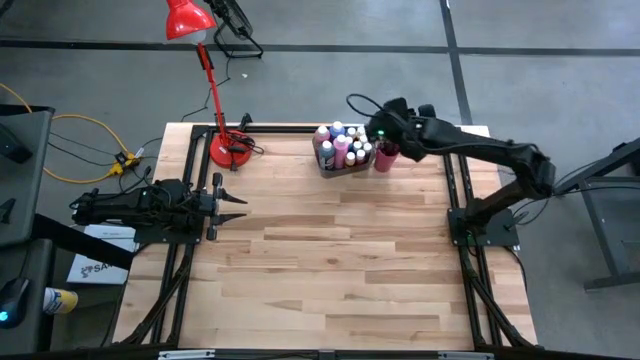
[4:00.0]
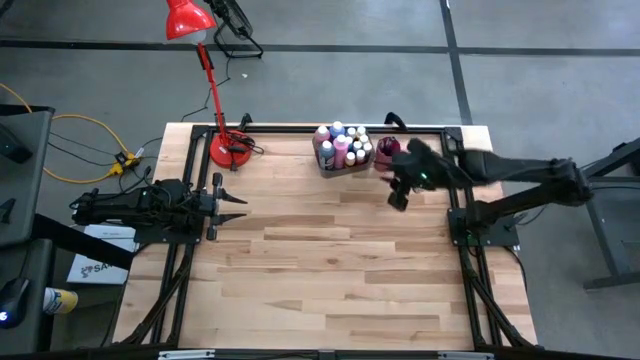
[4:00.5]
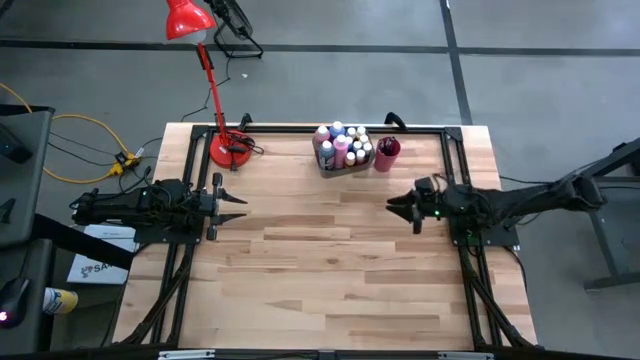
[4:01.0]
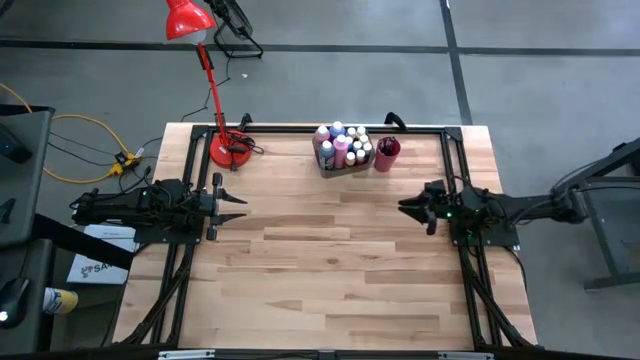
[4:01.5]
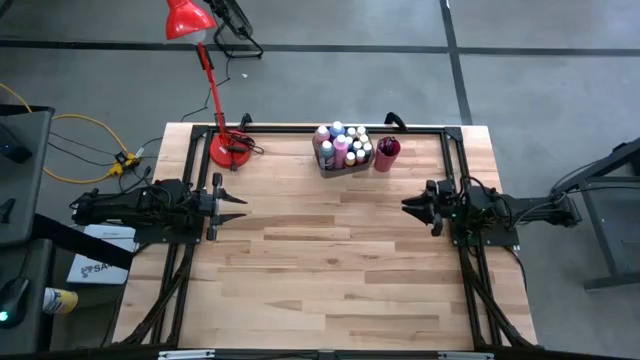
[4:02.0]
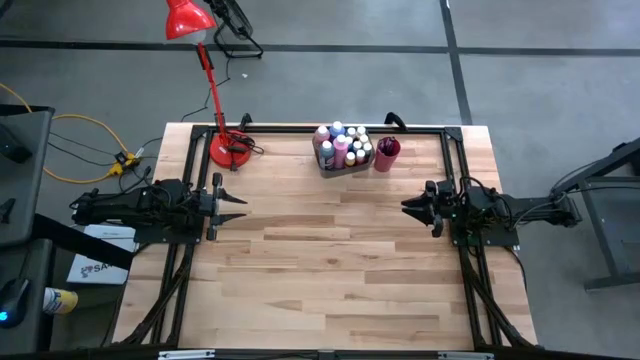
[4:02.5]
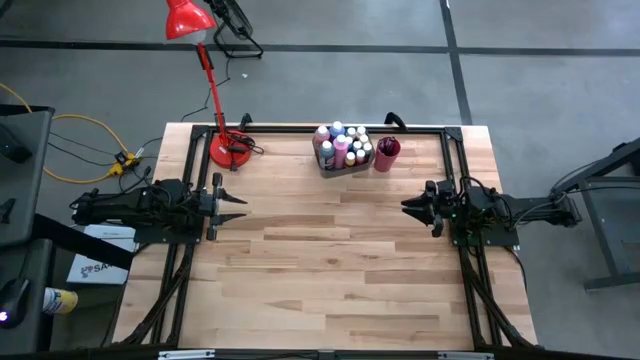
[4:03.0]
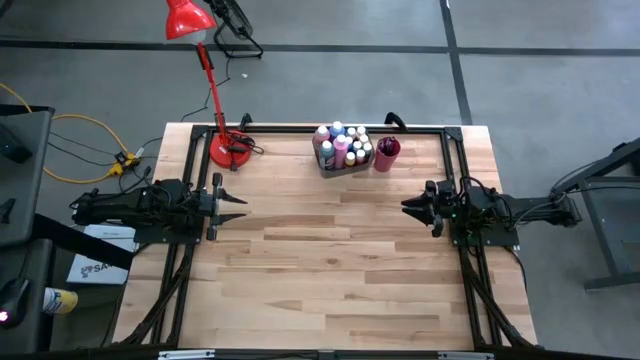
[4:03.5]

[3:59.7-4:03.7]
Task: Pick & Place Paint Supplies
Return to Home Position

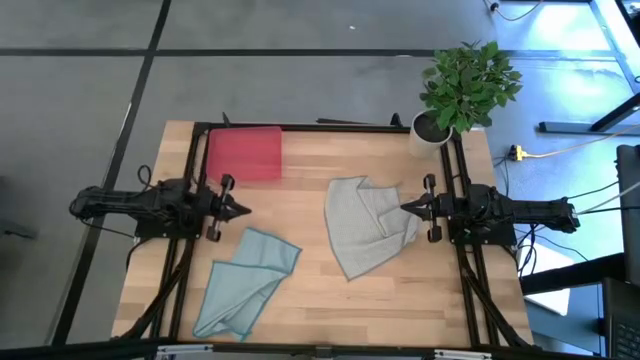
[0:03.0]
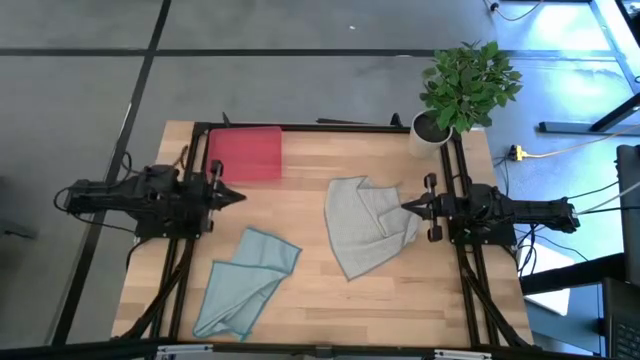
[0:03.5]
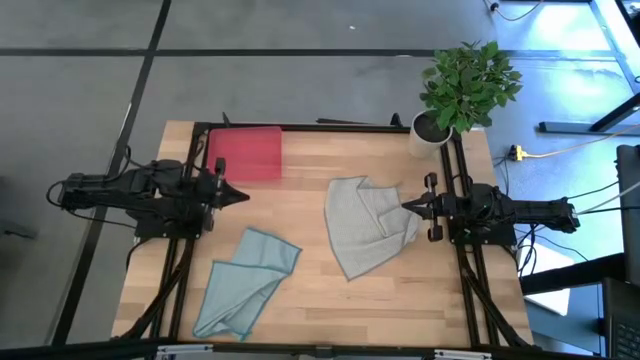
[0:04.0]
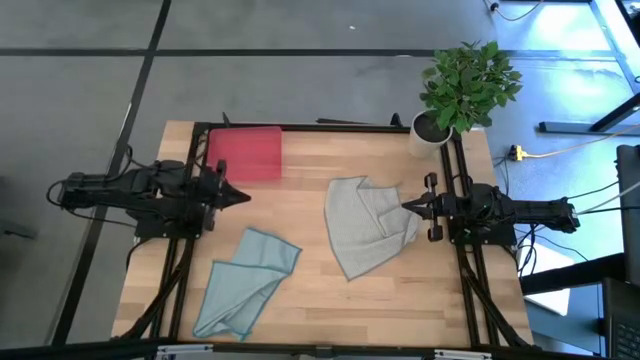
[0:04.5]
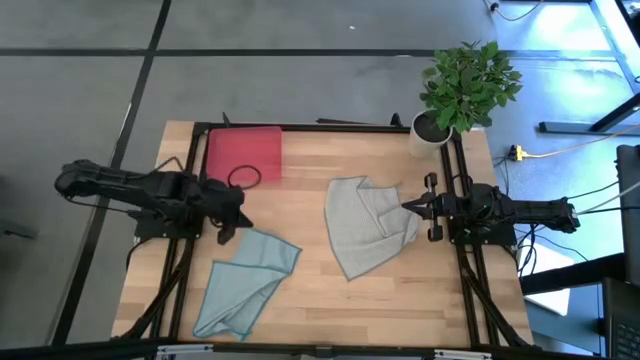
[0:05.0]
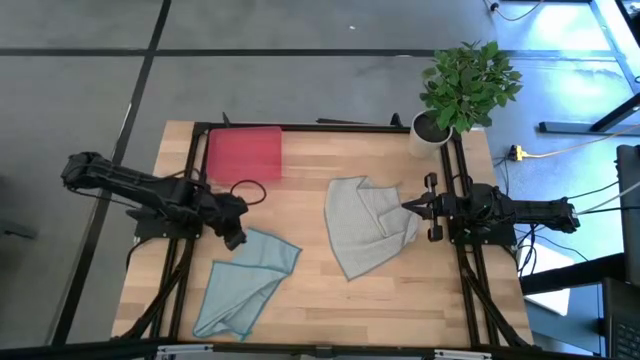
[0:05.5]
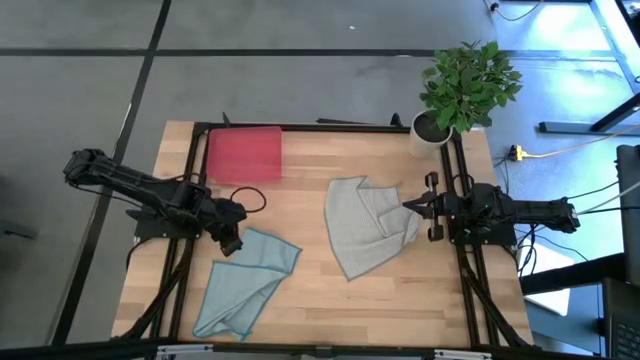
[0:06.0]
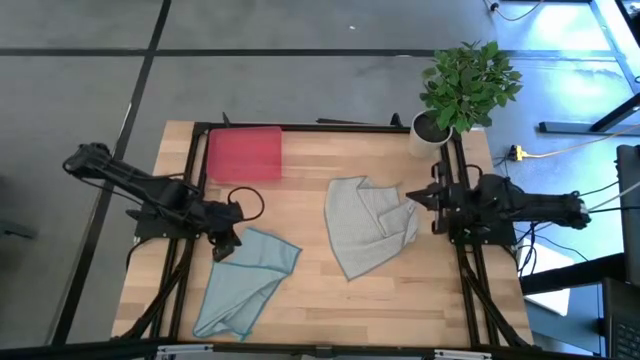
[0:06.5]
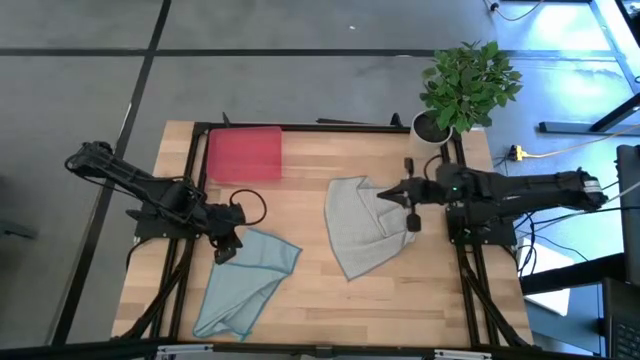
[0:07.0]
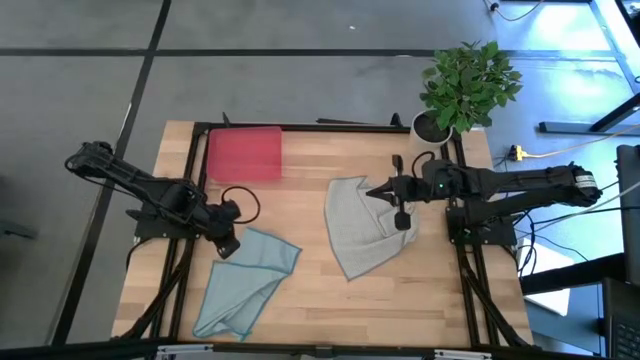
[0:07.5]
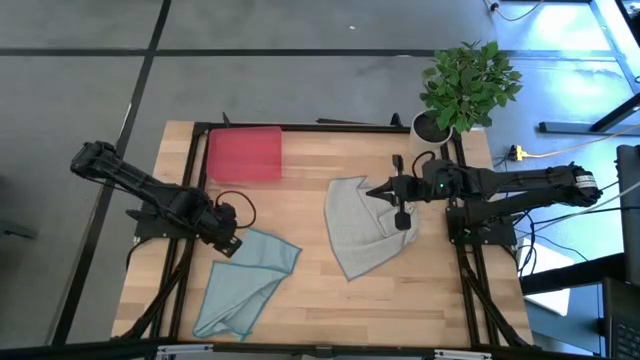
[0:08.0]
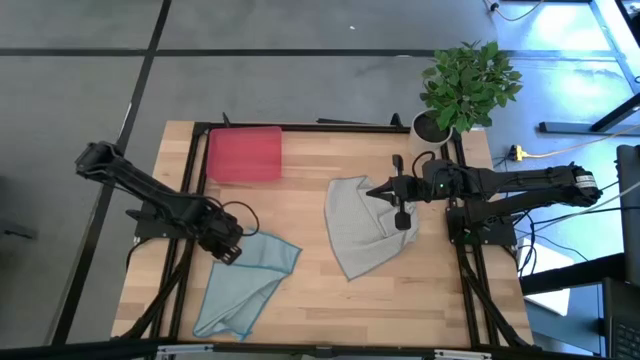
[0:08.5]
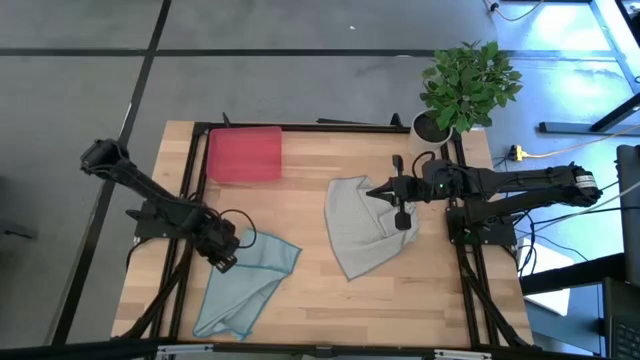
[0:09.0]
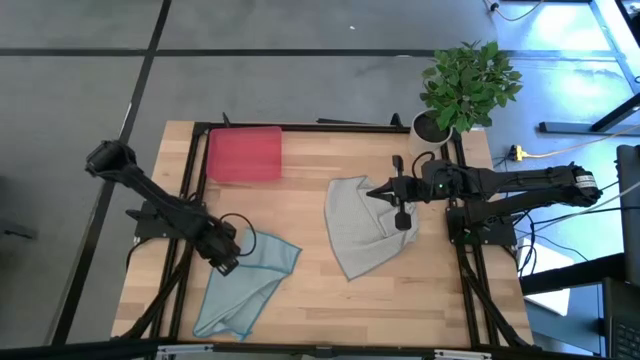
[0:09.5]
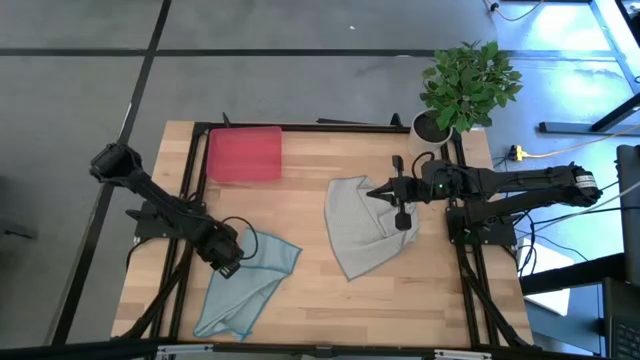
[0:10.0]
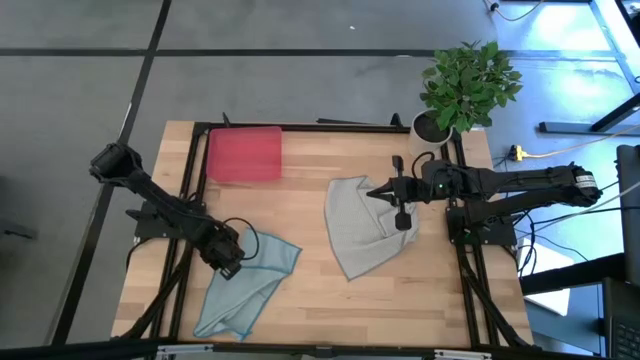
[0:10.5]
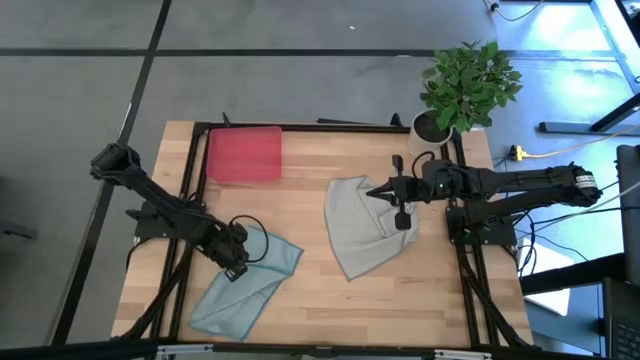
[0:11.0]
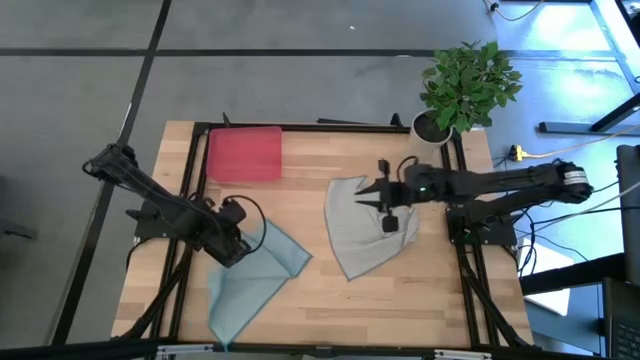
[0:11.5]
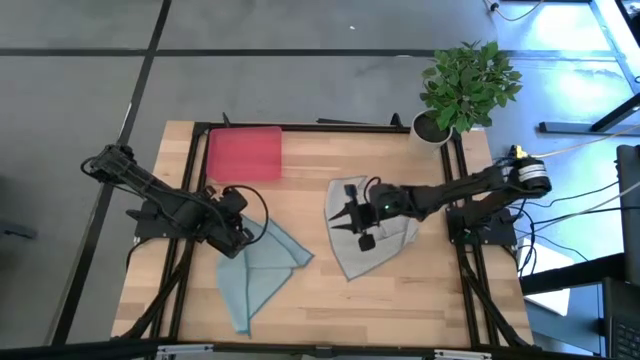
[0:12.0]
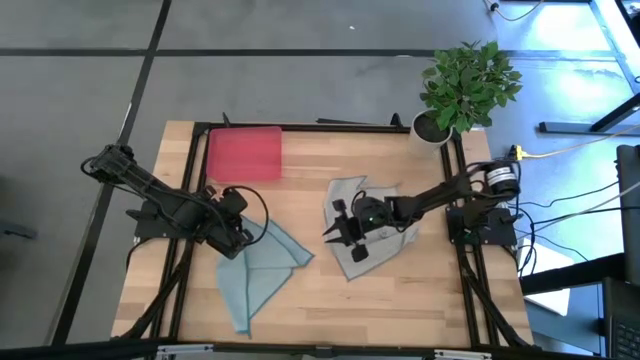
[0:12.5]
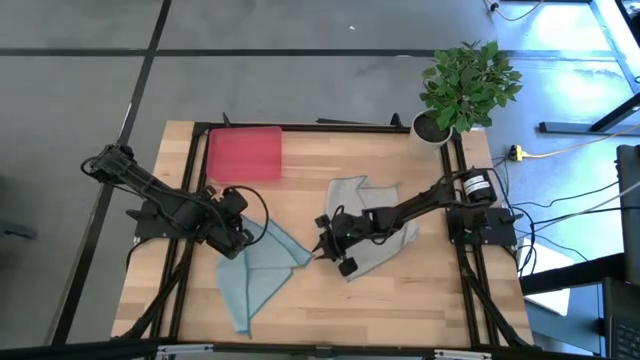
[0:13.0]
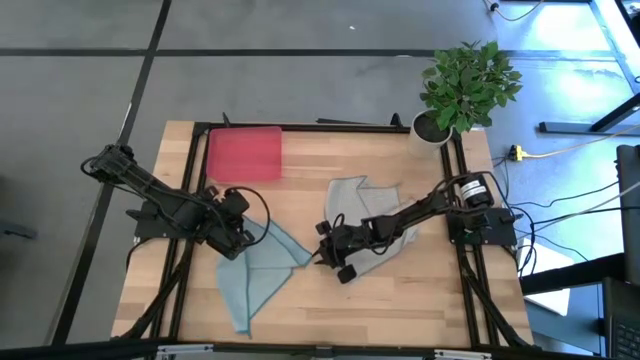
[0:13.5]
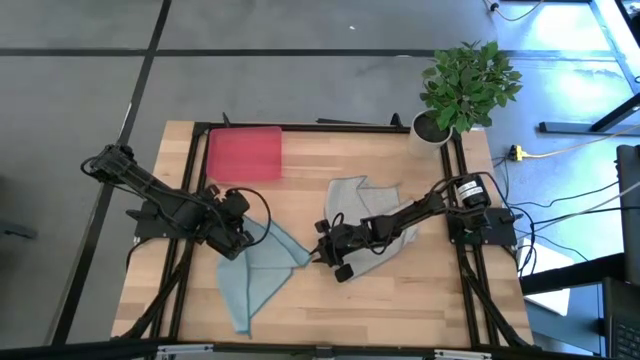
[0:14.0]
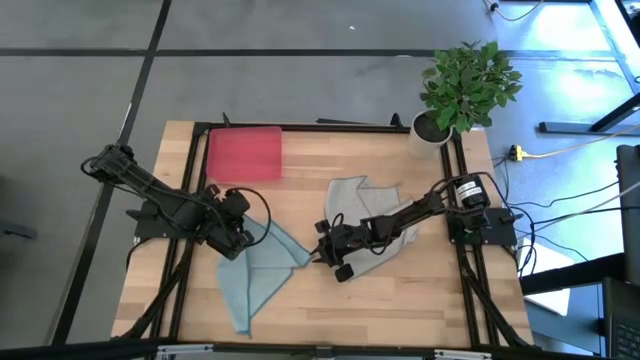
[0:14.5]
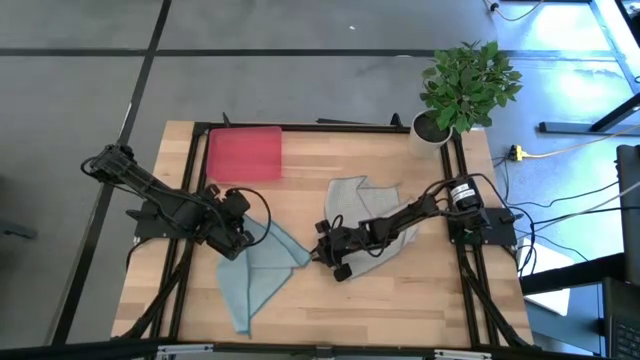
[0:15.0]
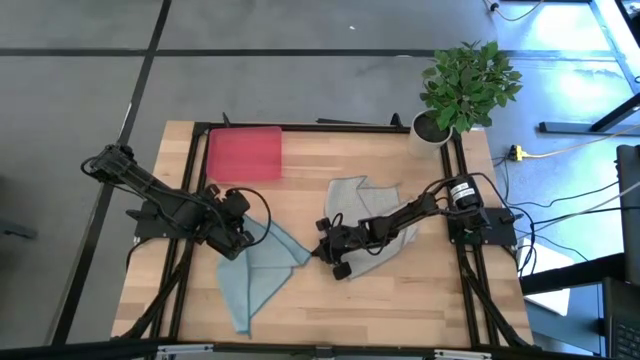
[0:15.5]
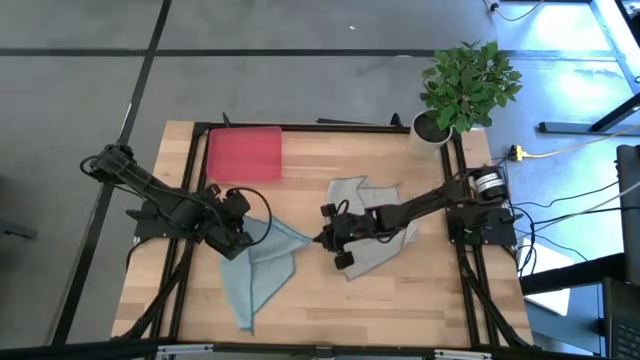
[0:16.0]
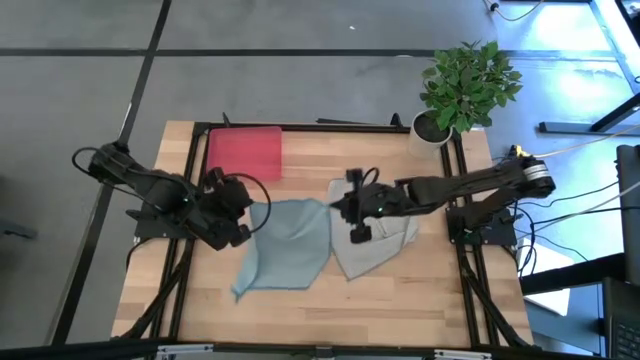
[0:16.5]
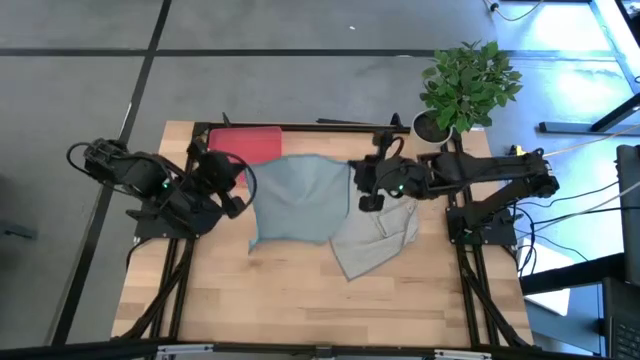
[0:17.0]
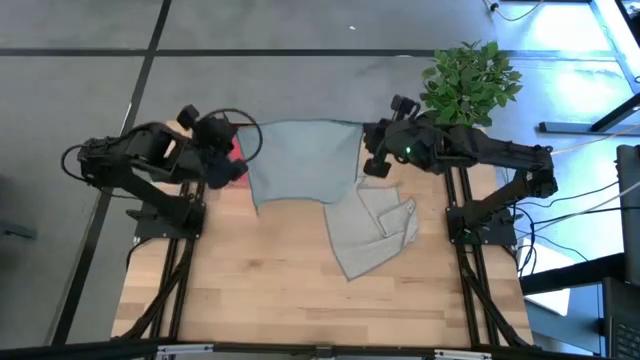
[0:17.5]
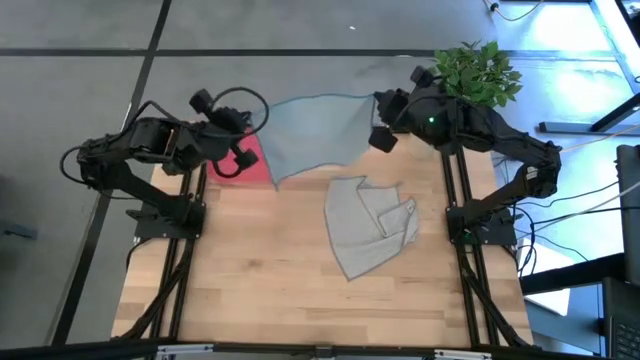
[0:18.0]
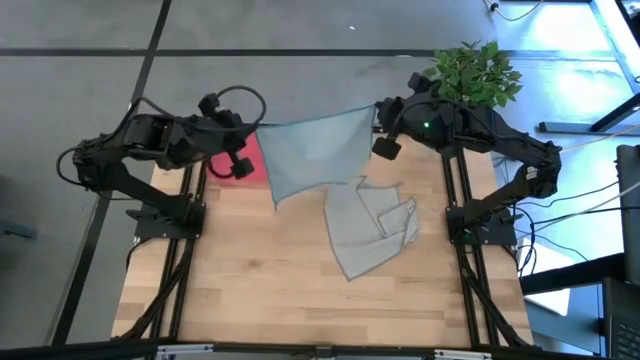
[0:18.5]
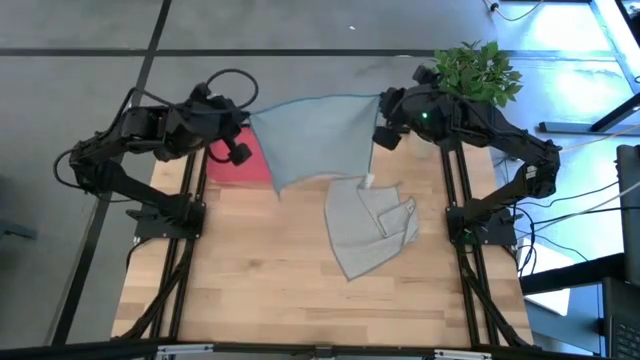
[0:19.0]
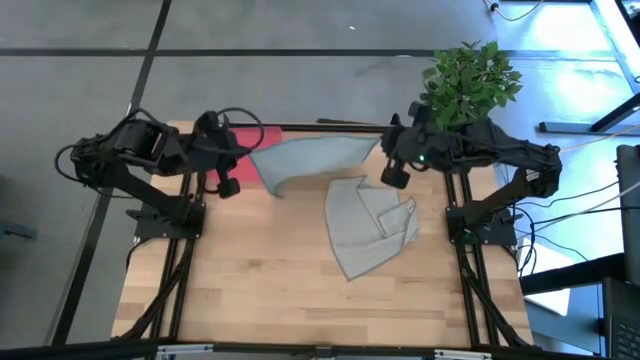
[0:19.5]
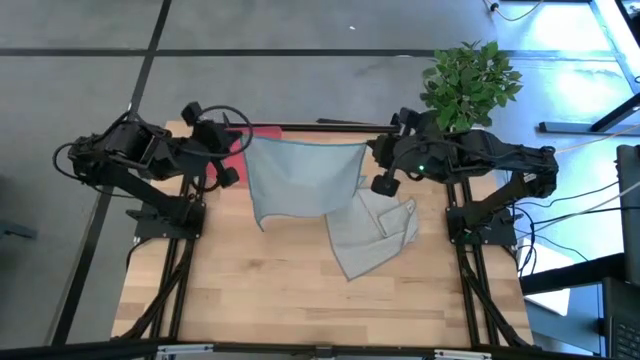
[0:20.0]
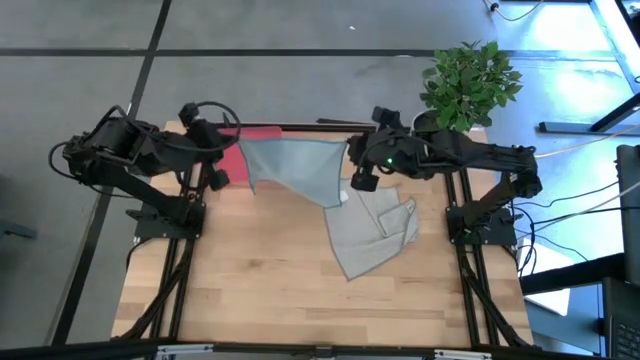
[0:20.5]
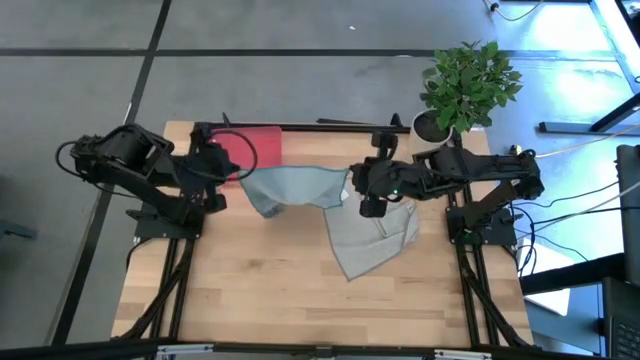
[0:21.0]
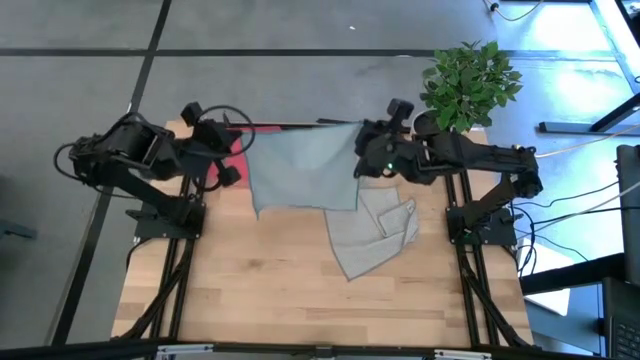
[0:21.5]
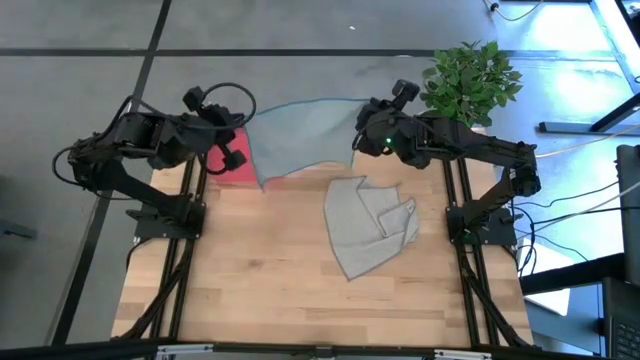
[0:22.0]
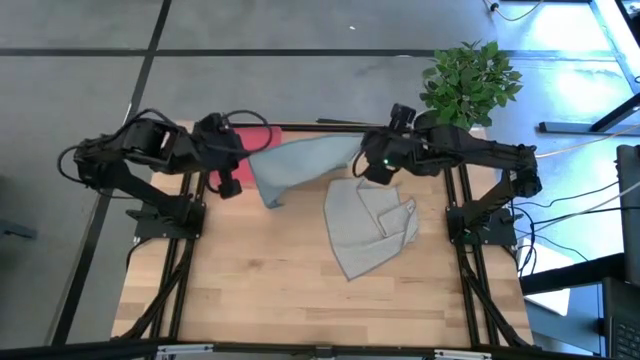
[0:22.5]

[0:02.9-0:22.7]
Task: Roll microfiber towels into tight, uniform cylinder then place into a basket
Fold the blue towel
